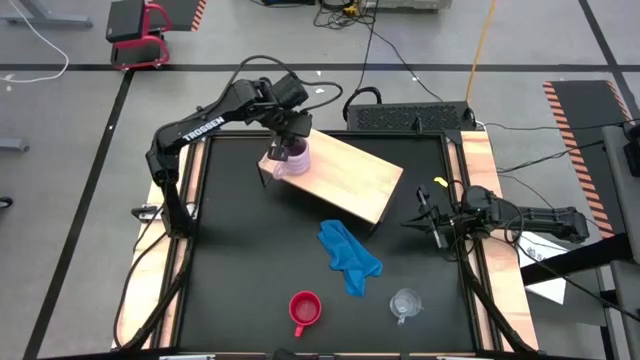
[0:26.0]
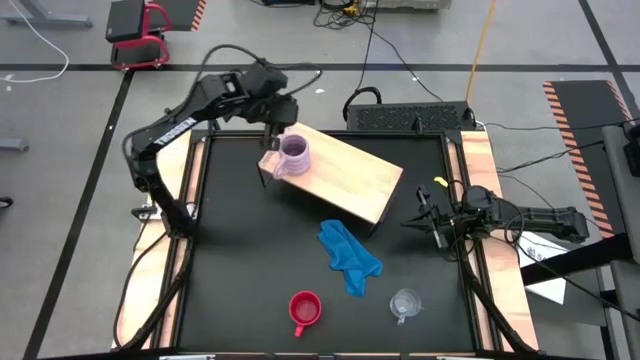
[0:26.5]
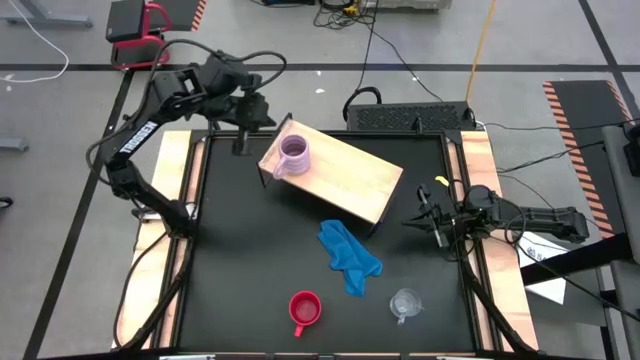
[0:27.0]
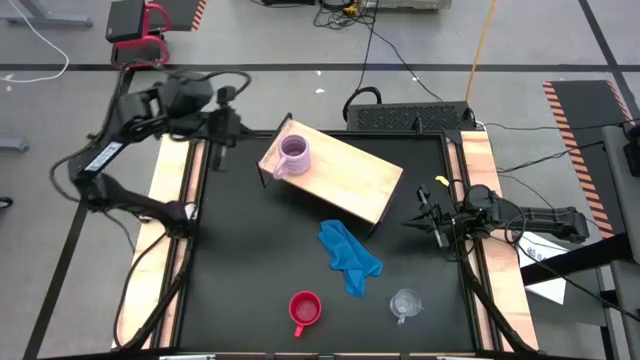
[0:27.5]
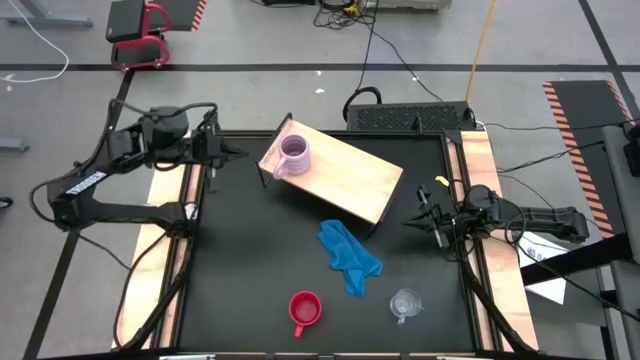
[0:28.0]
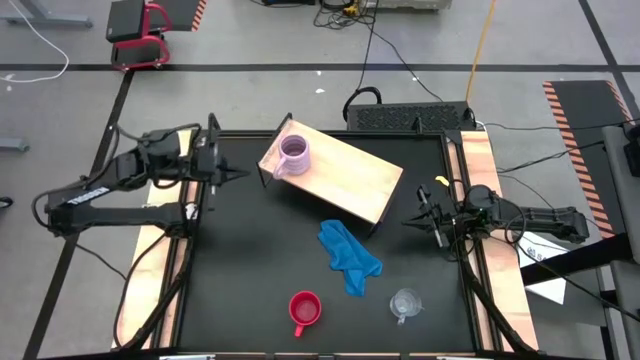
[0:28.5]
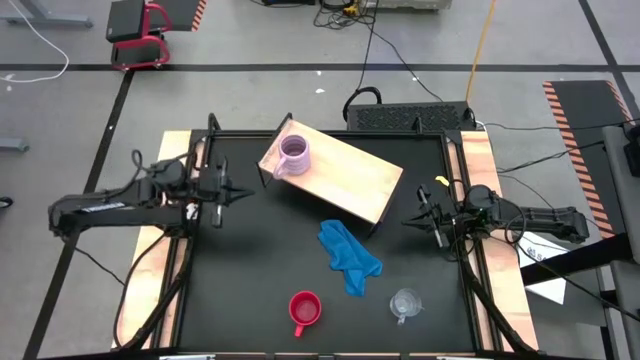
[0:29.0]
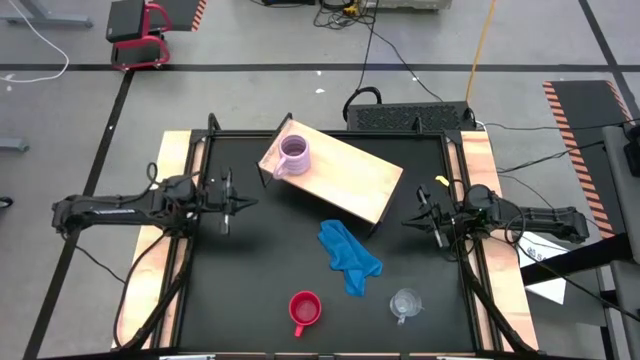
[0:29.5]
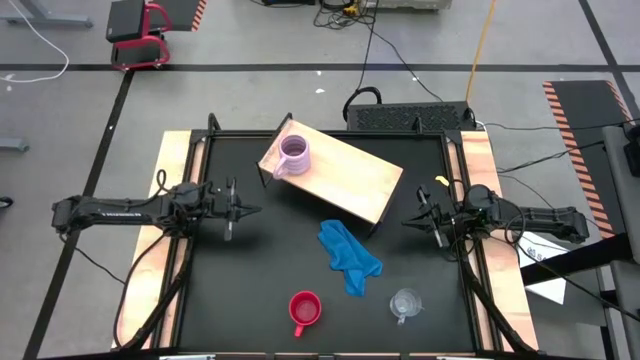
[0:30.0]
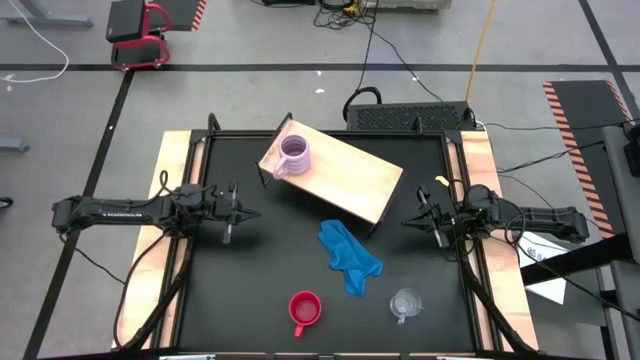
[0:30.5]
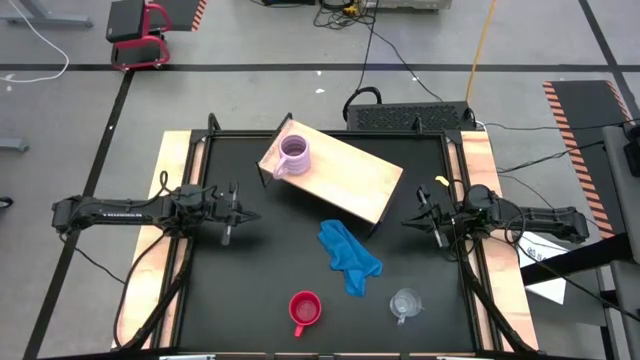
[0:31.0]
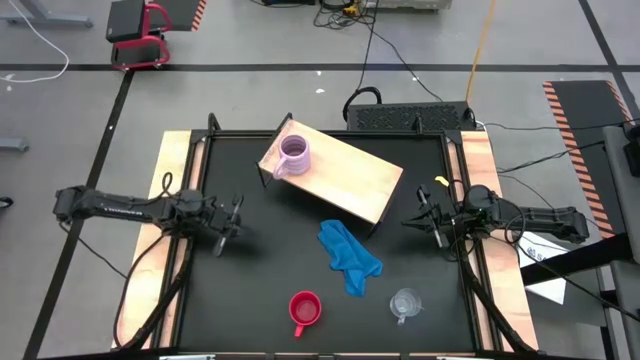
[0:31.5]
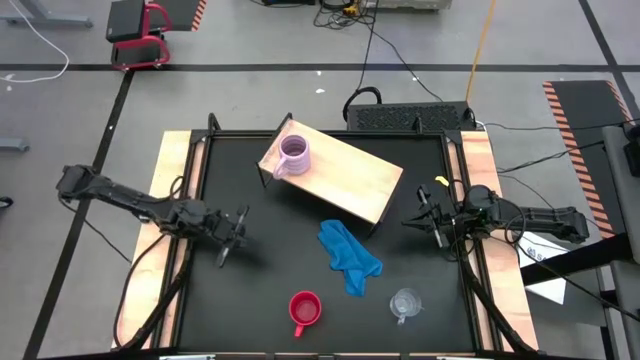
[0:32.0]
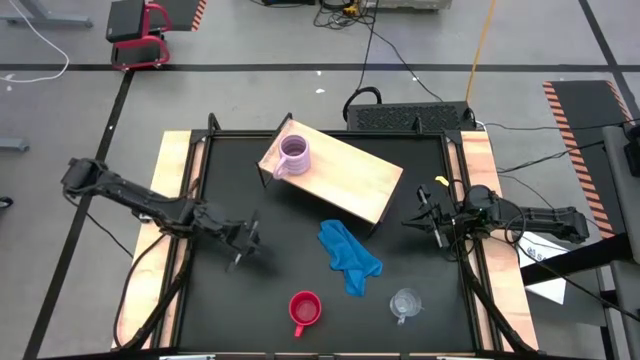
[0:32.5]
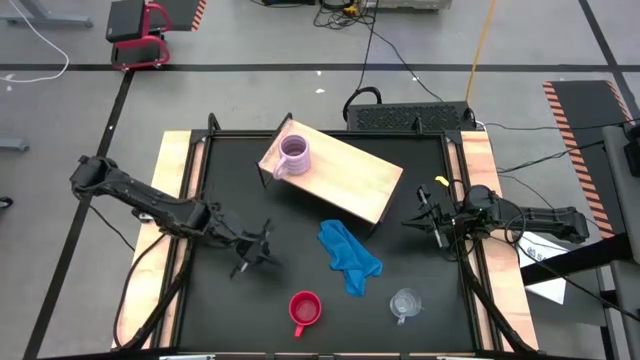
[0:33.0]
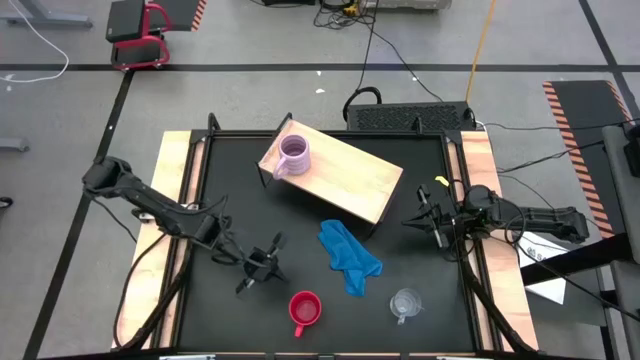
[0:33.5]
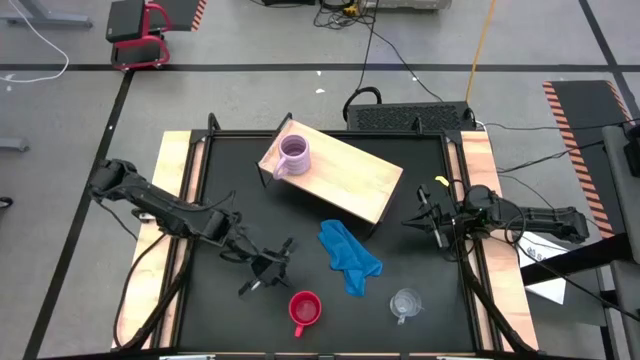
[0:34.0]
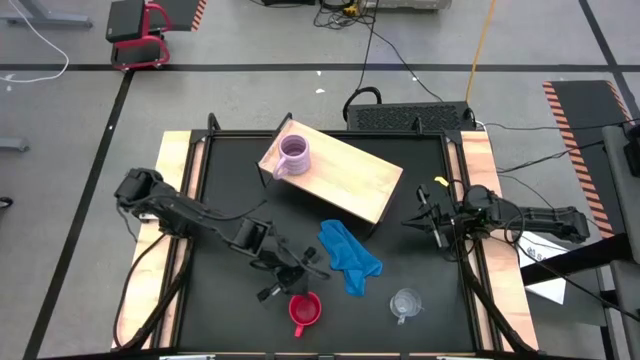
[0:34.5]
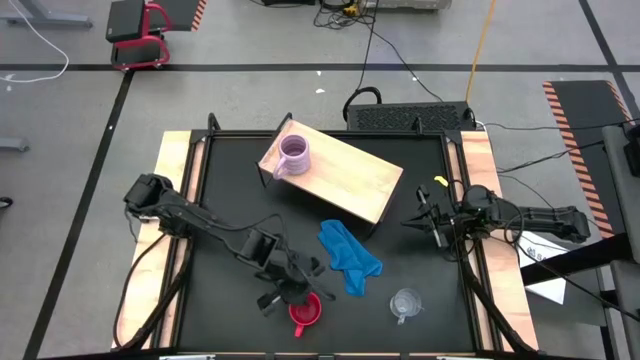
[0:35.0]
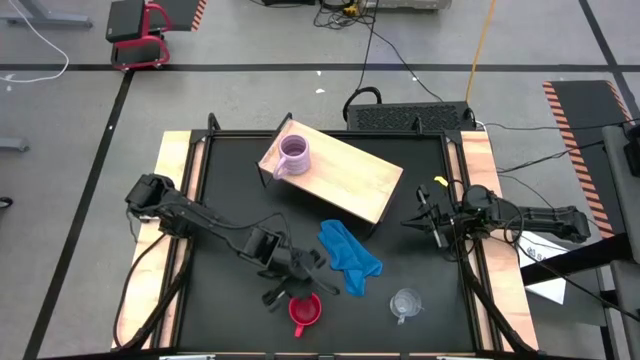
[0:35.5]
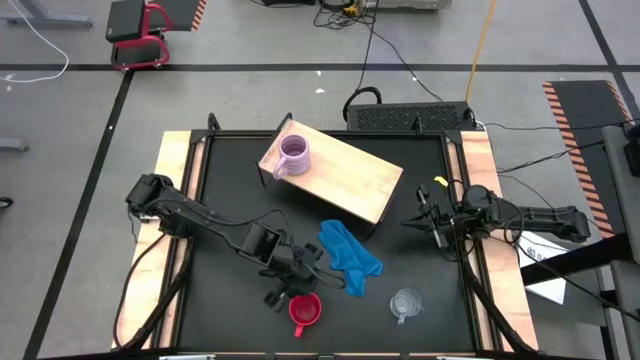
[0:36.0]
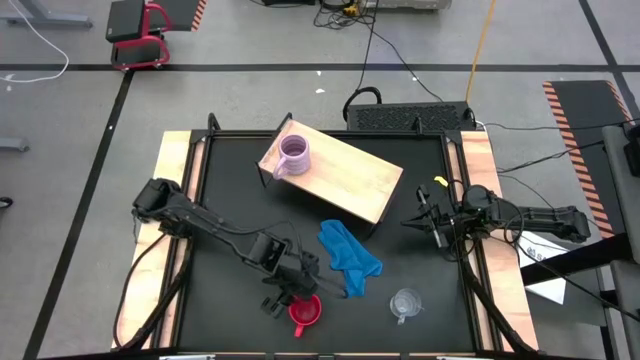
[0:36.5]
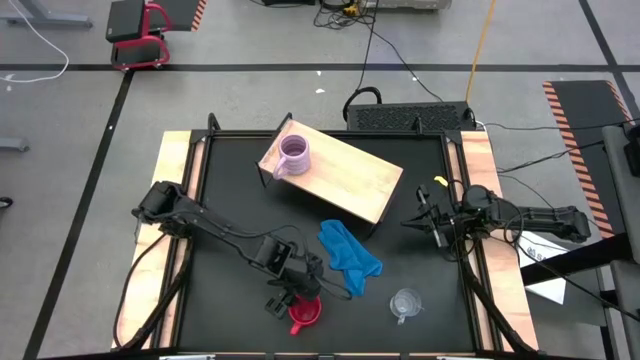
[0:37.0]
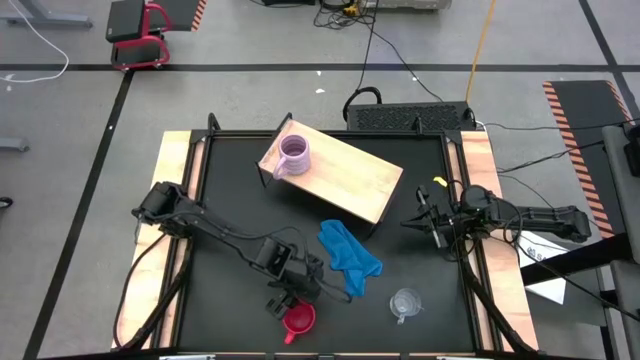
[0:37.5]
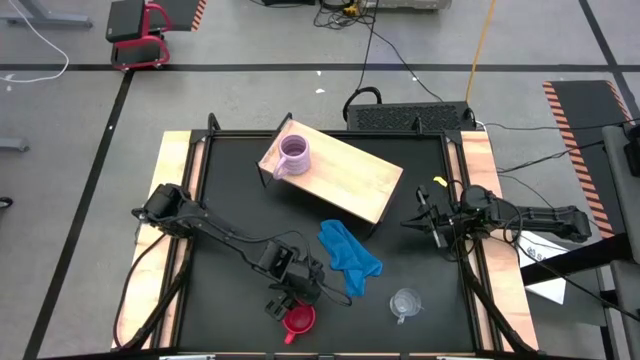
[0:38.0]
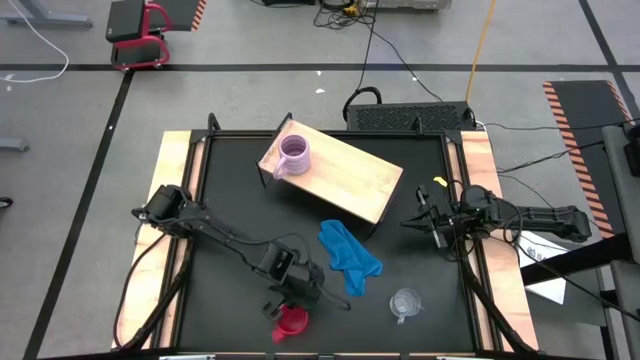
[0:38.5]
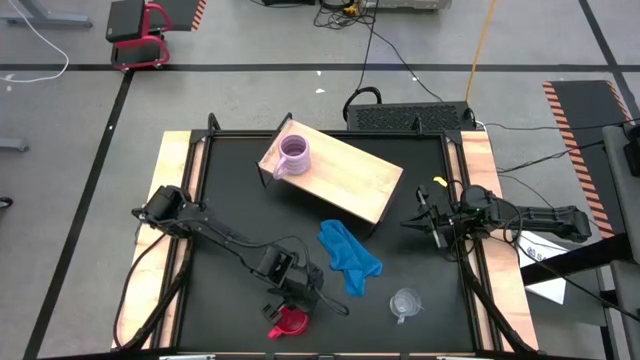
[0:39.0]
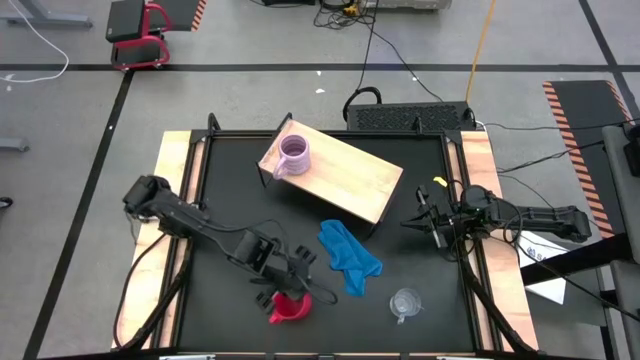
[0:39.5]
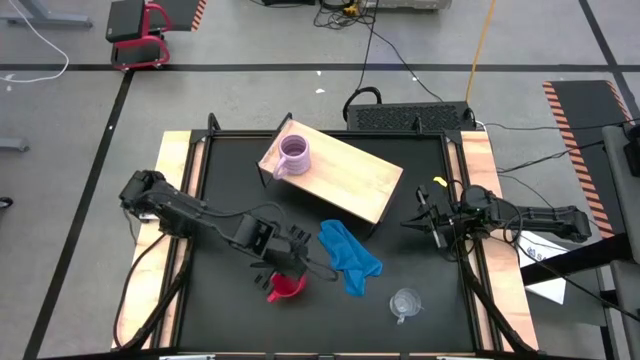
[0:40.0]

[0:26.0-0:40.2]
Task: Stack small to large cups/mugs on shelf
Put the red mug on the shelf

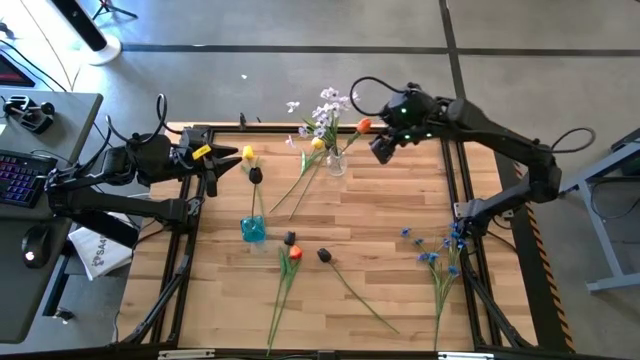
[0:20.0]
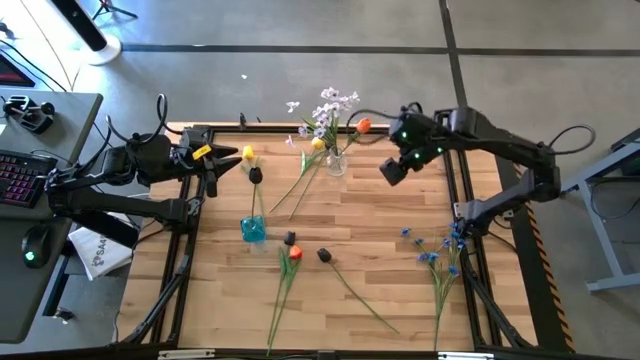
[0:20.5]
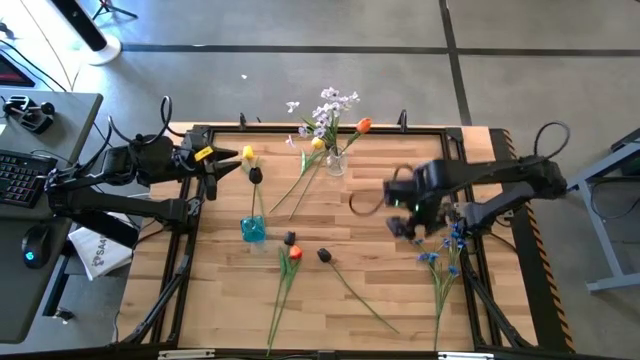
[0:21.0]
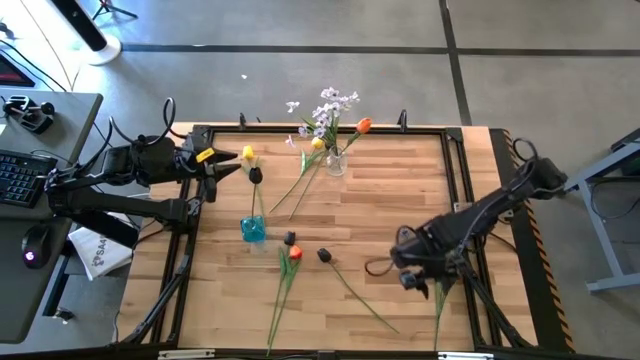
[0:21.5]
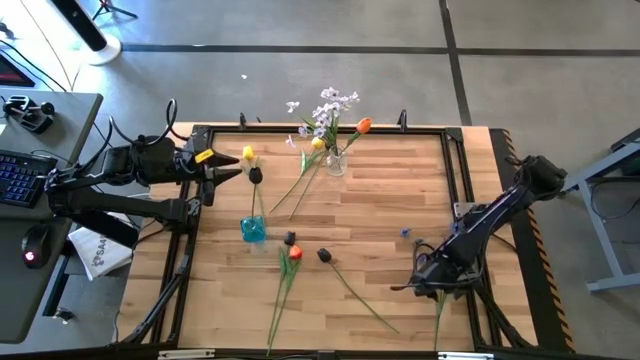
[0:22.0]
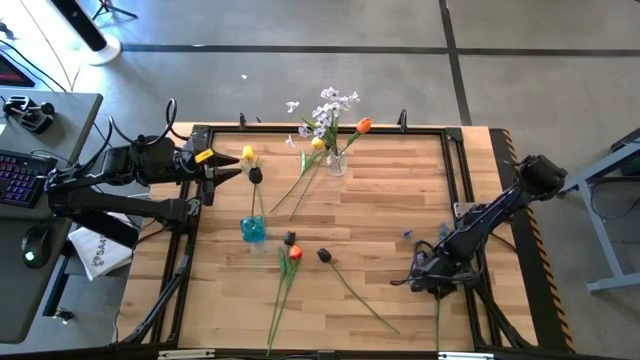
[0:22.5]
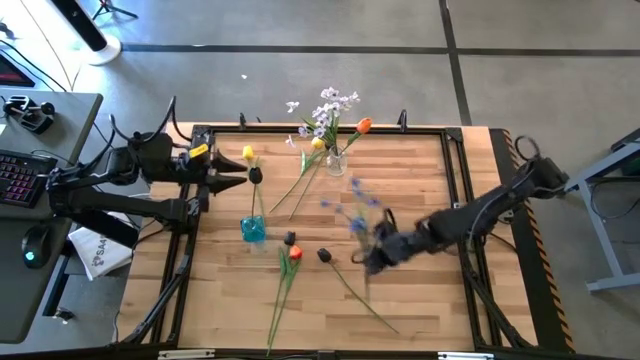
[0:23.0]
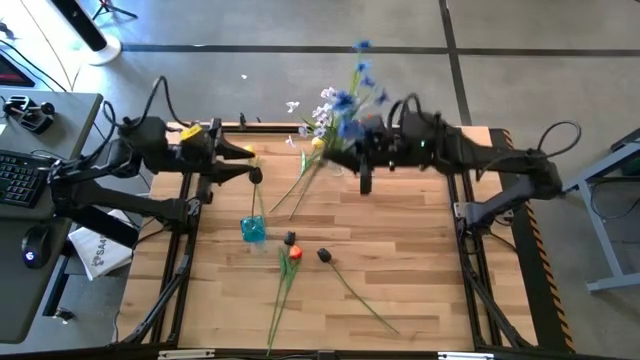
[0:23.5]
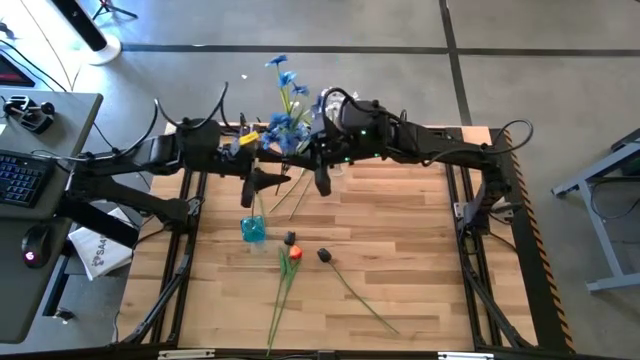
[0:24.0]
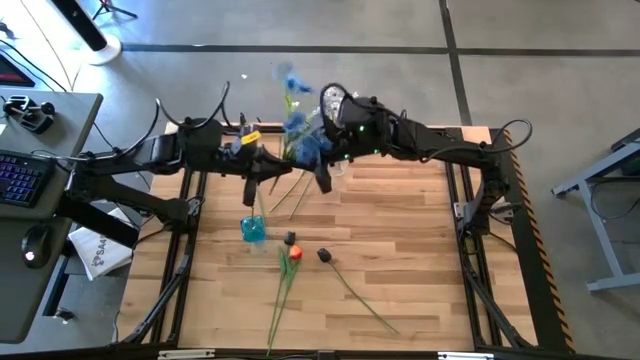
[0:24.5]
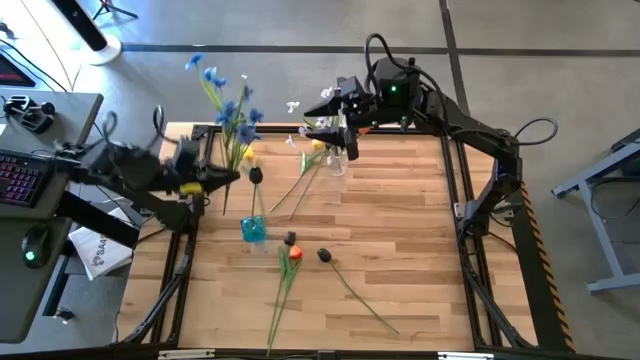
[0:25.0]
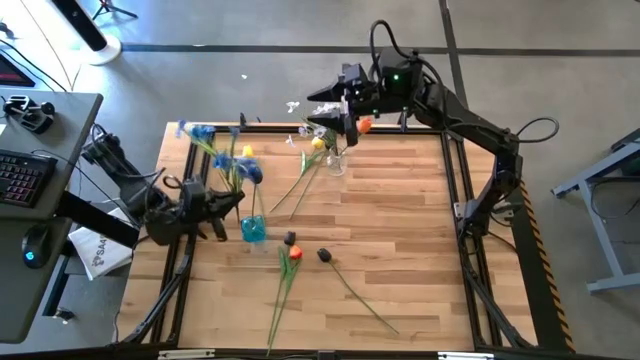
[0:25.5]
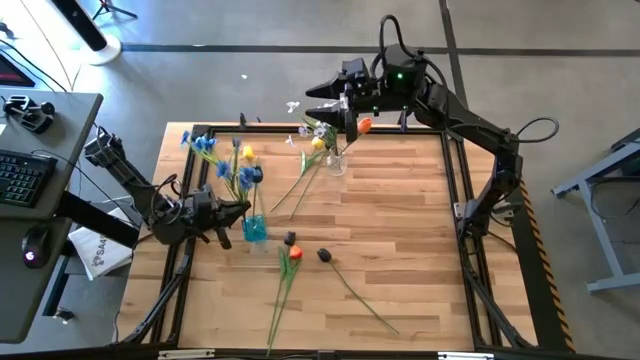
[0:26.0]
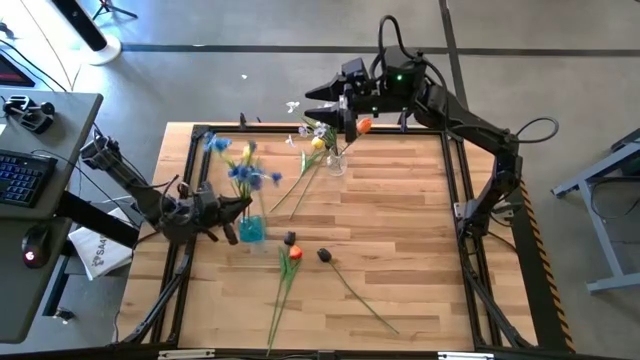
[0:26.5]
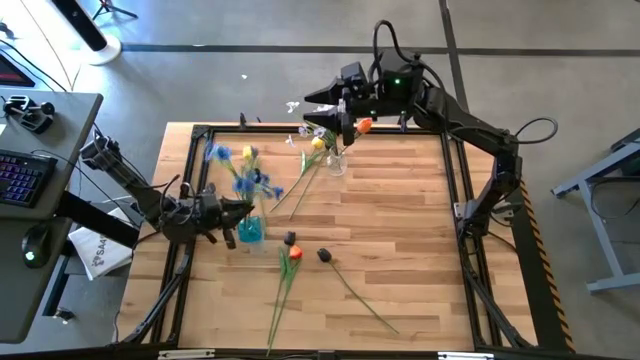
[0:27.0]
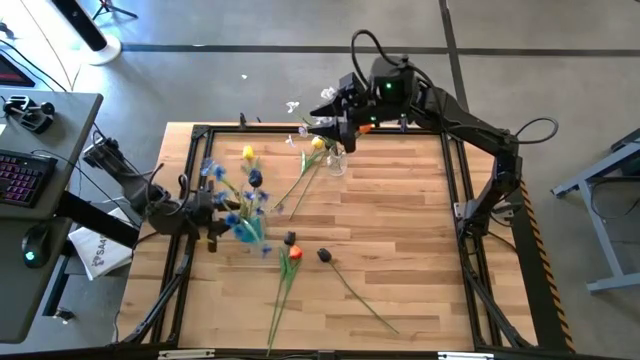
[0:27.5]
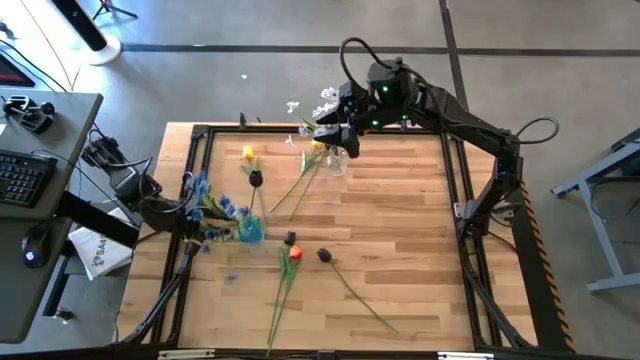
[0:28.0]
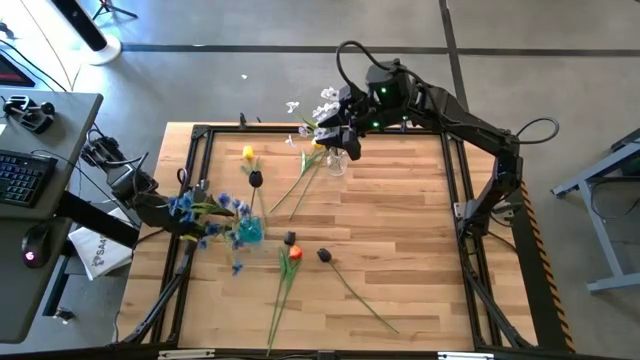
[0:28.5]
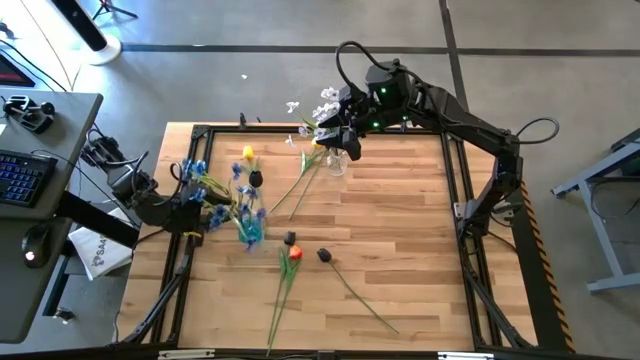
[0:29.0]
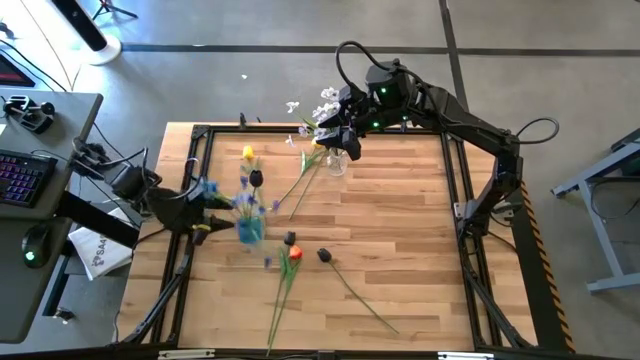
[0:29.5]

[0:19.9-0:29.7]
Task: Sort flowers into vase by color
Put the blue flowers into the blue vase
